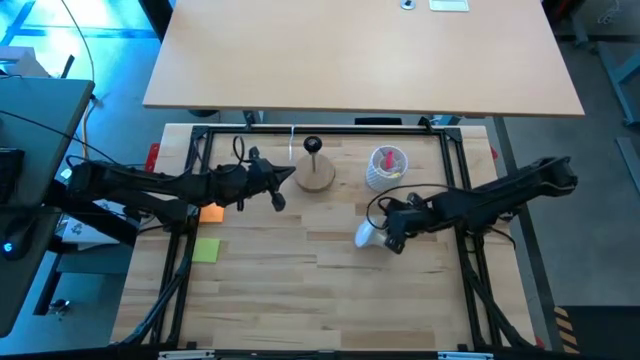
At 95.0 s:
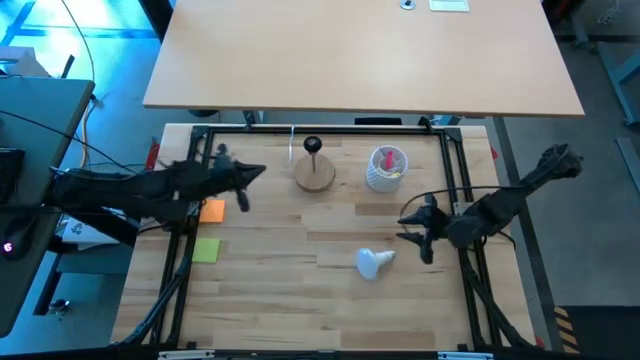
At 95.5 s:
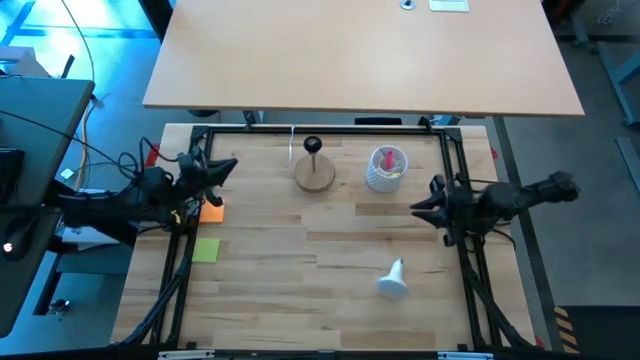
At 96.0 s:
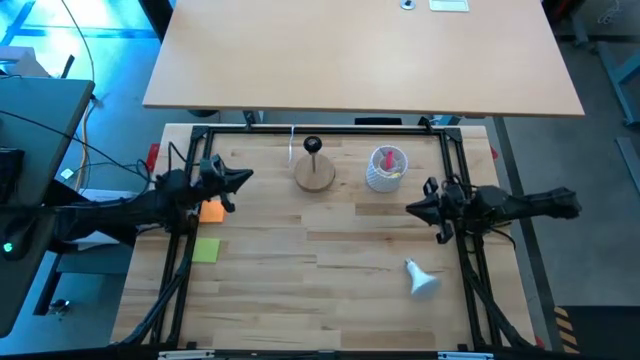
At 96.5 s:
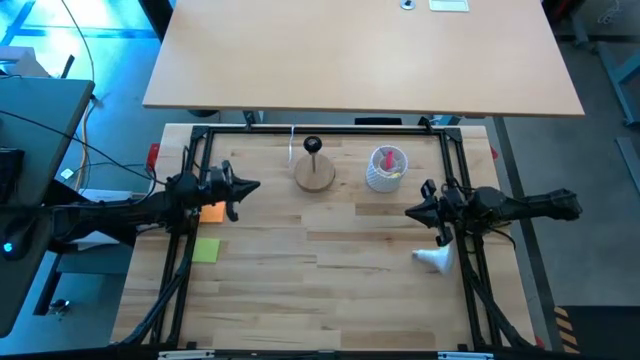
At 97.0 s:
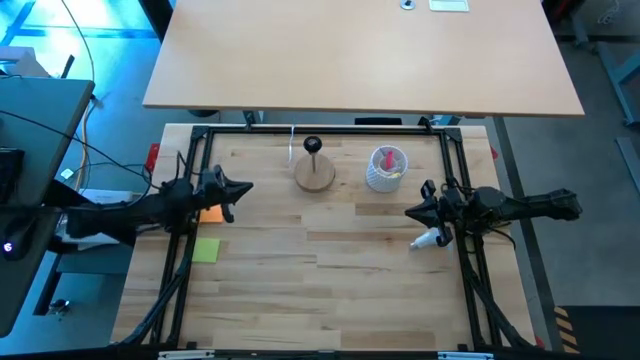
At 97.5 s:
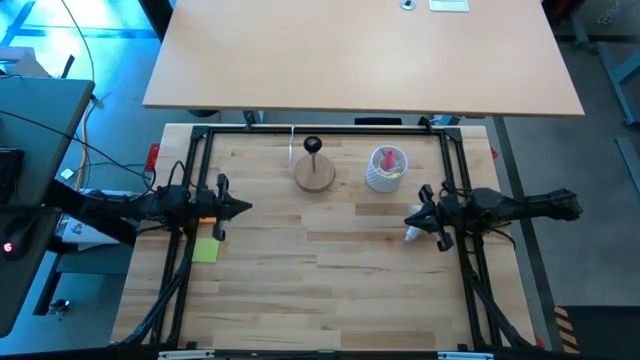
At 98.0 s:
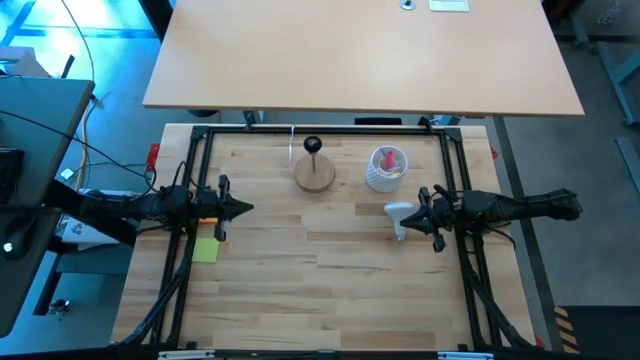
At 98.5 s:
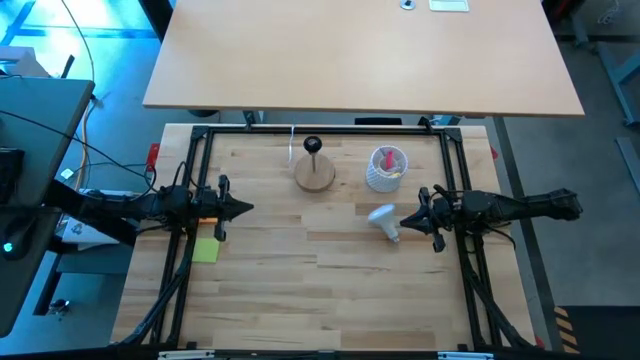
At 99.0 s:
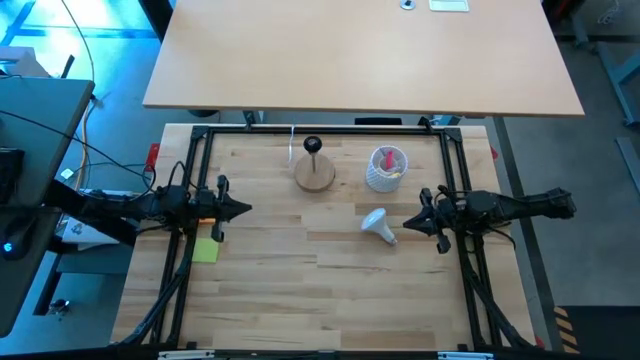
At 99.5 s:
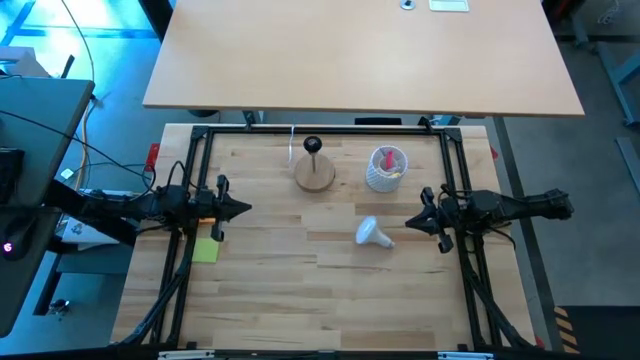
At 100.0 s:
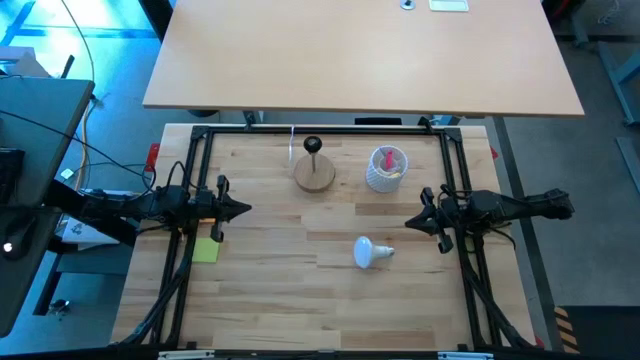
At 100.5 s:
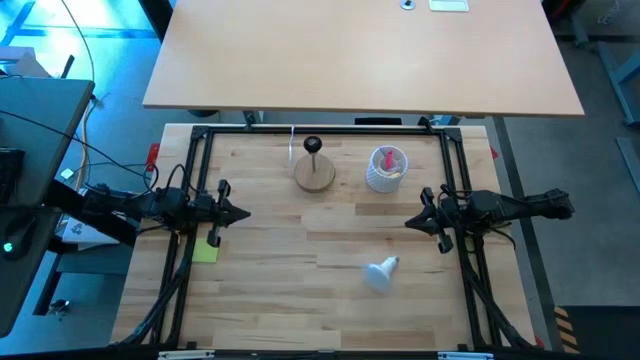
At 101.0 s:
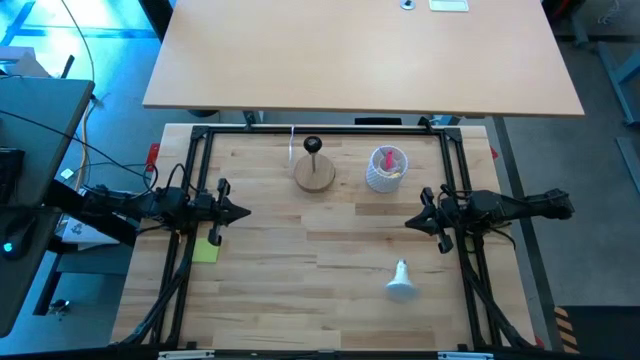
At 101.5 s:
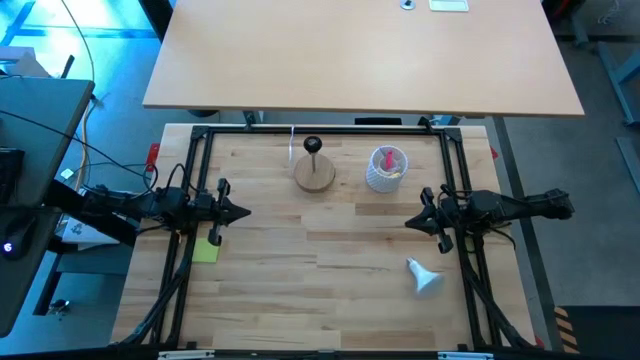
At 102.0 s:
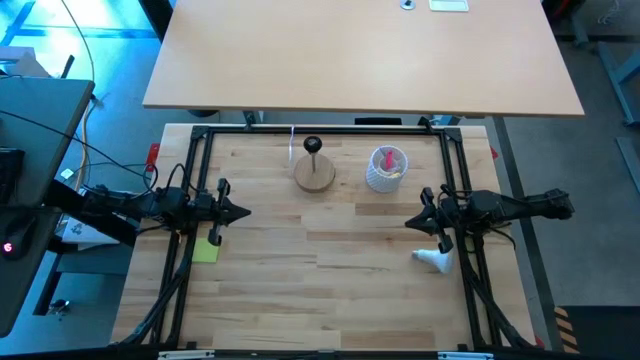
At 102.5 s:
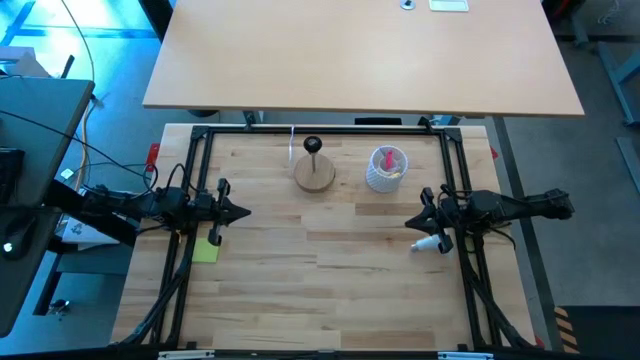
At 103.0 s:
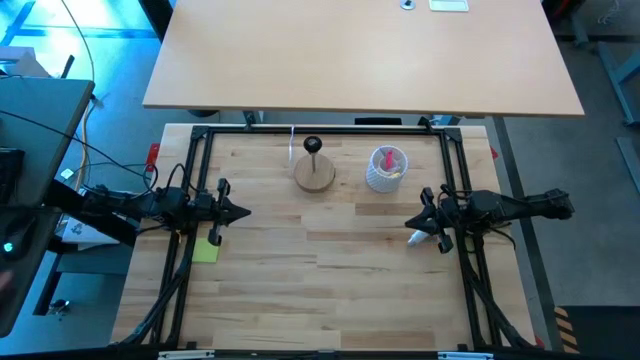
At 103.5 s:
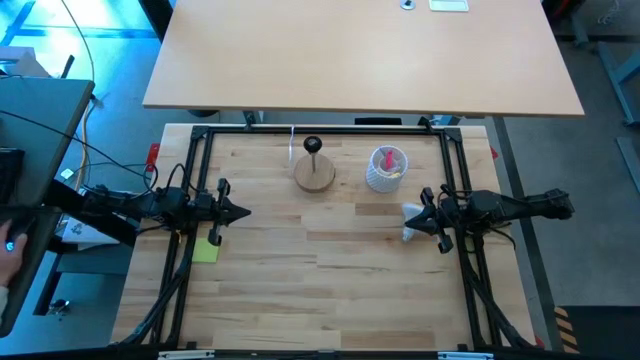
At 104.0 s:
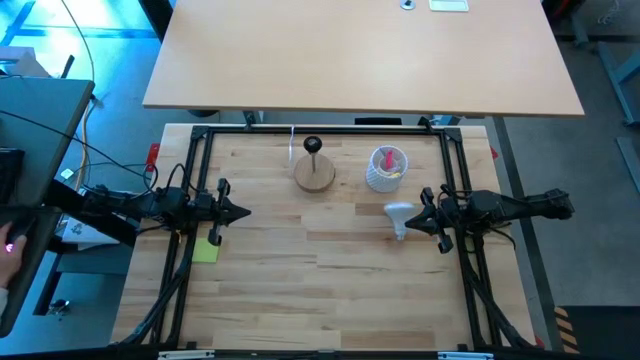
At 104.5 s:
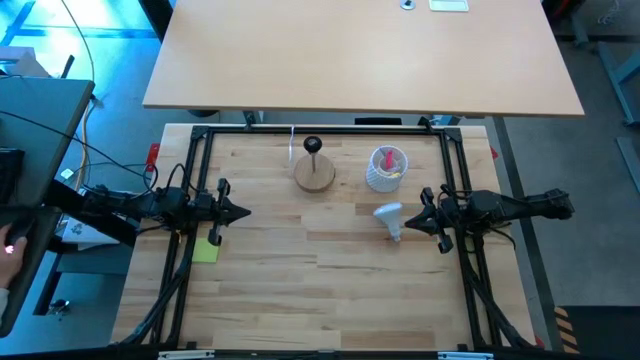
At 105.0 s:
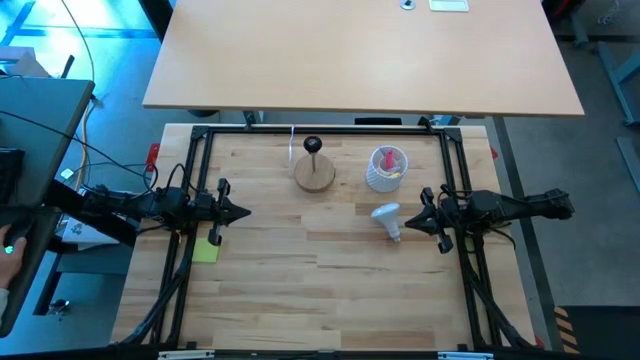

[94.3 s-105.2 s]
Task: Screw lightbulb
Return to Home Position

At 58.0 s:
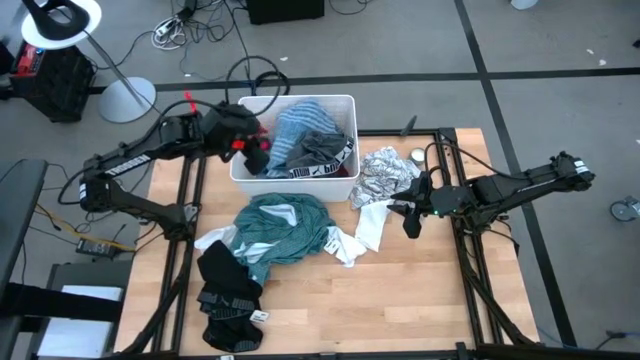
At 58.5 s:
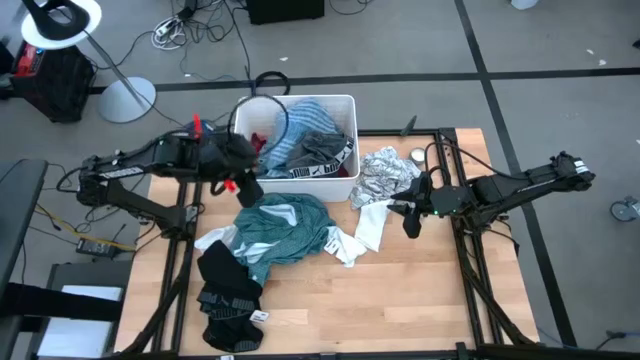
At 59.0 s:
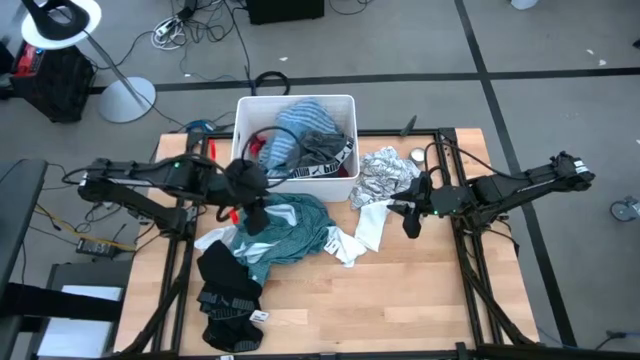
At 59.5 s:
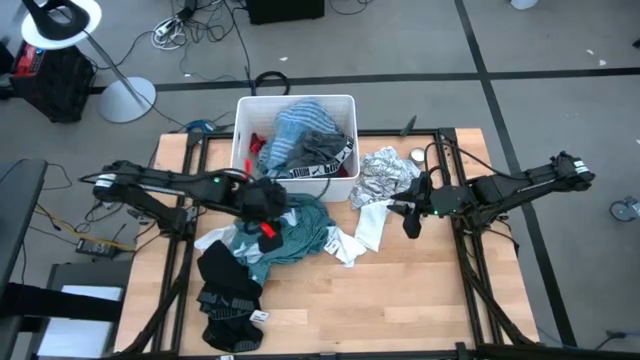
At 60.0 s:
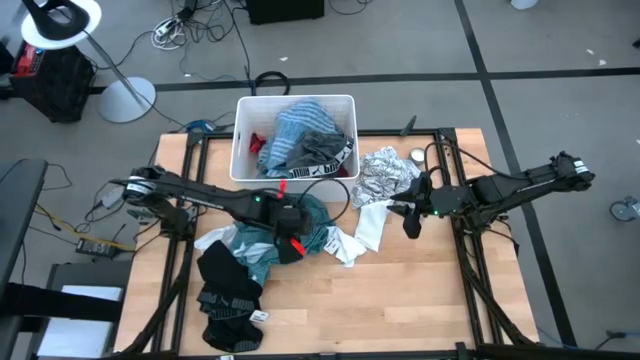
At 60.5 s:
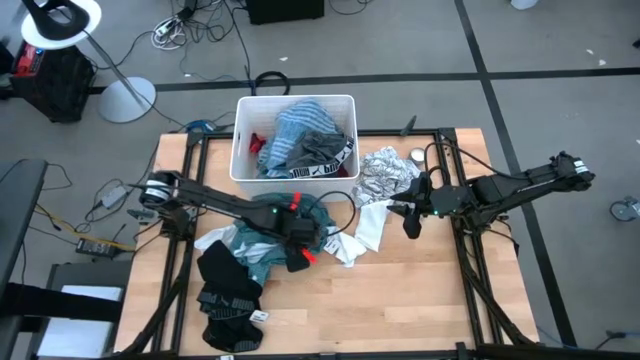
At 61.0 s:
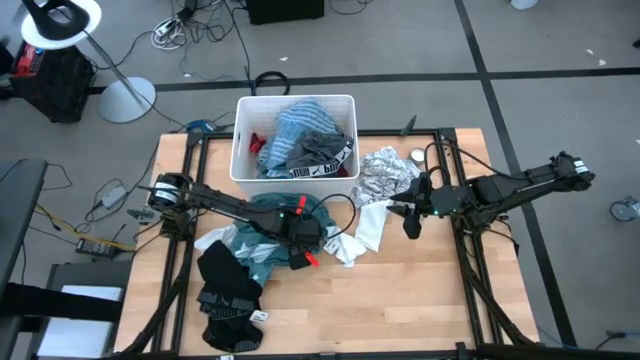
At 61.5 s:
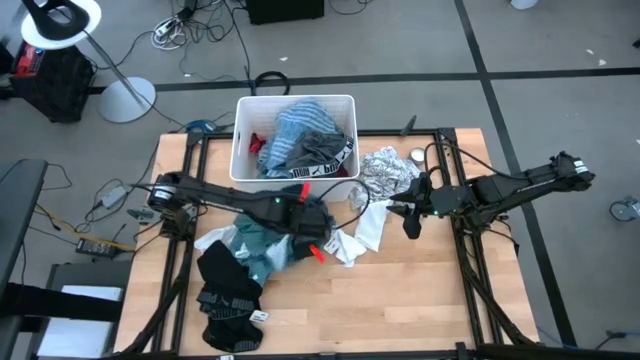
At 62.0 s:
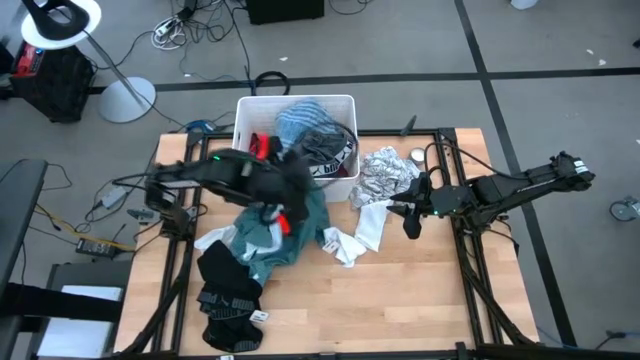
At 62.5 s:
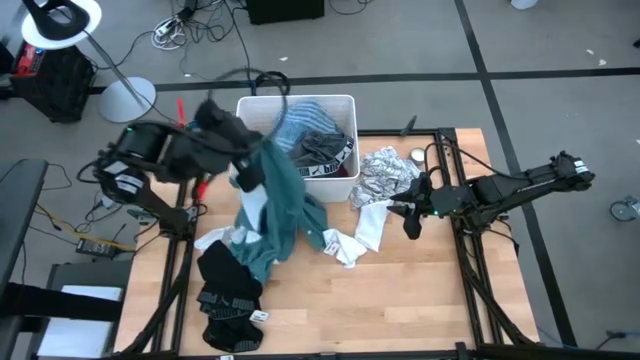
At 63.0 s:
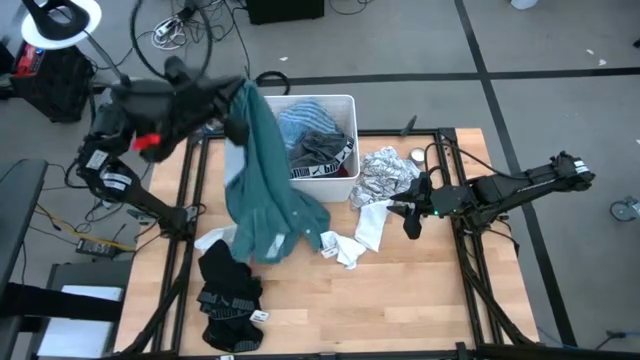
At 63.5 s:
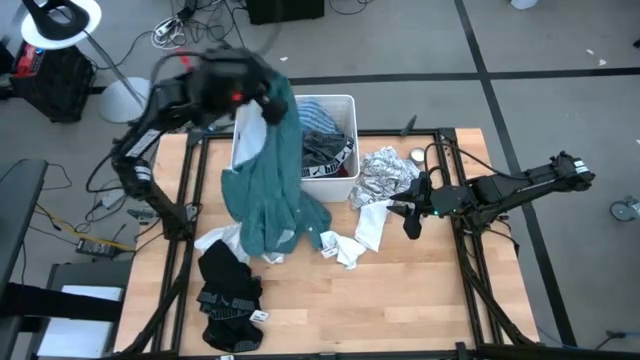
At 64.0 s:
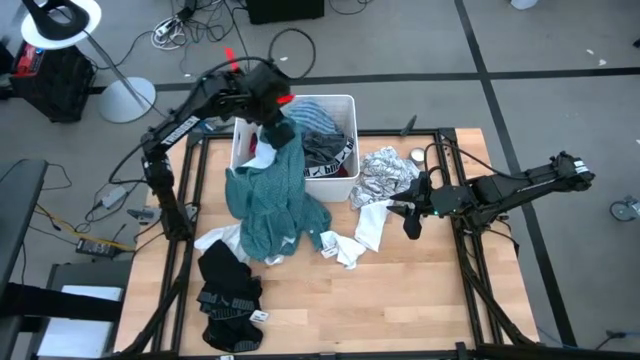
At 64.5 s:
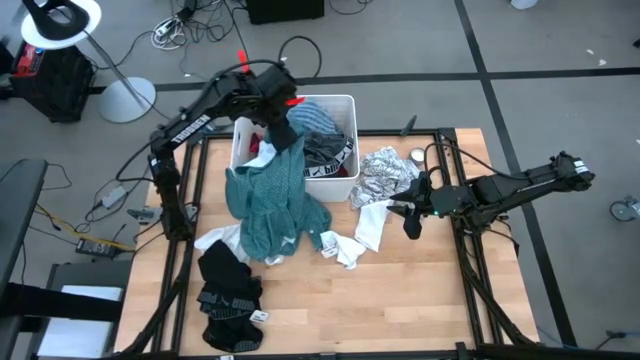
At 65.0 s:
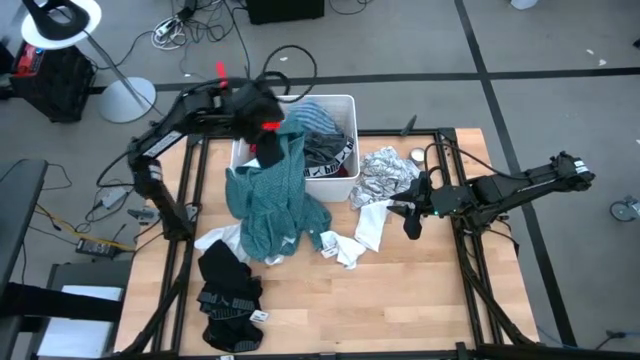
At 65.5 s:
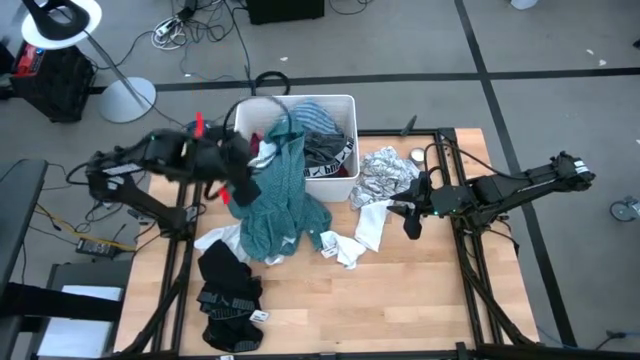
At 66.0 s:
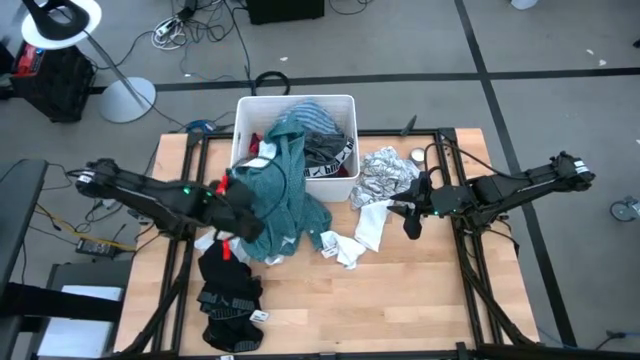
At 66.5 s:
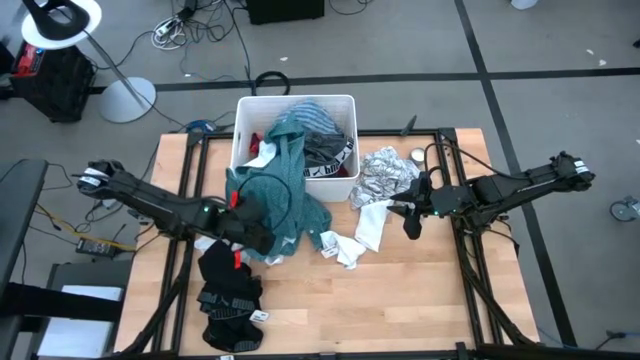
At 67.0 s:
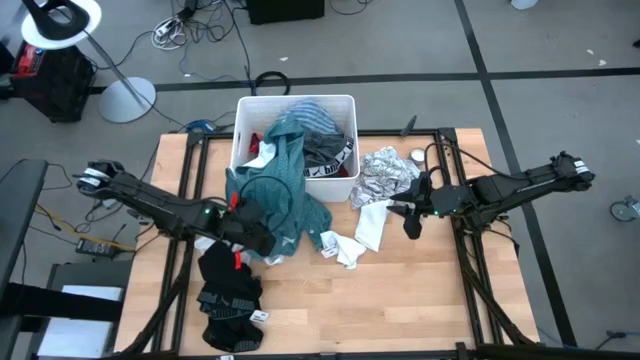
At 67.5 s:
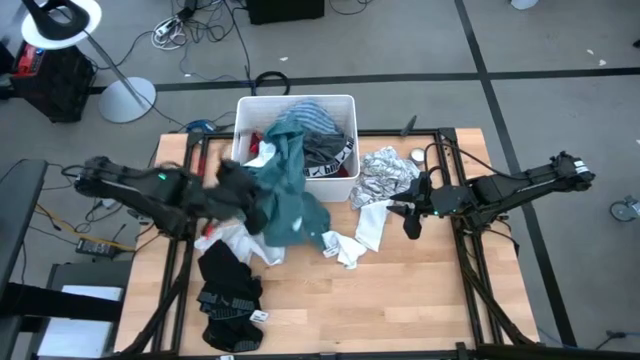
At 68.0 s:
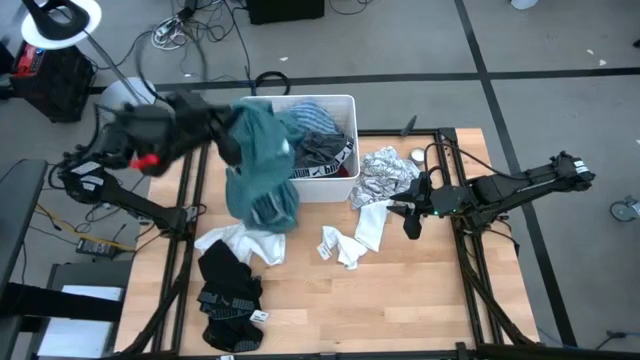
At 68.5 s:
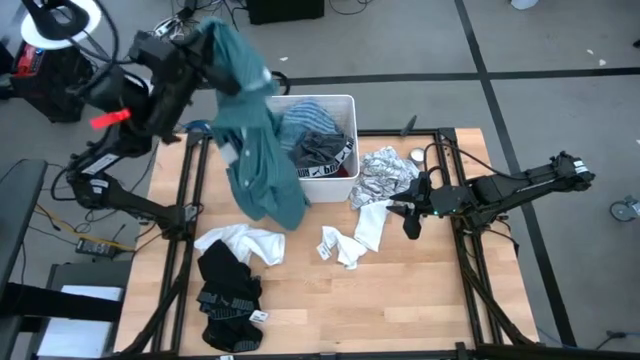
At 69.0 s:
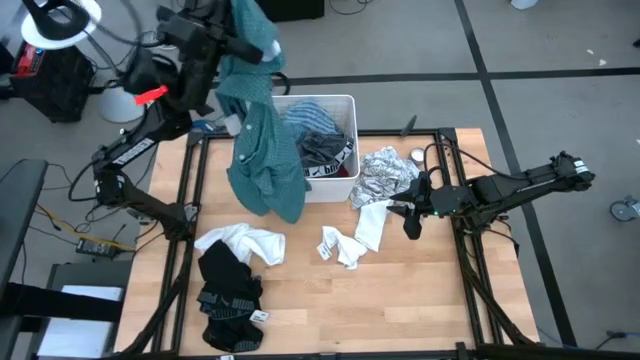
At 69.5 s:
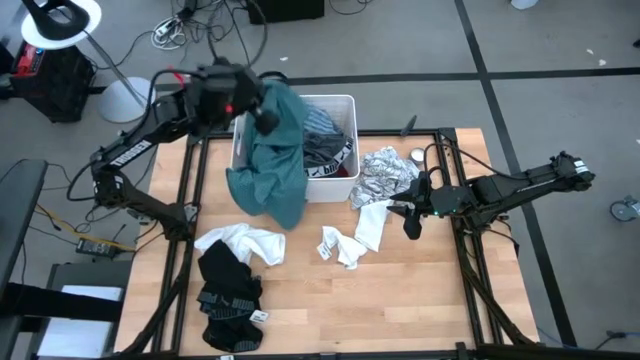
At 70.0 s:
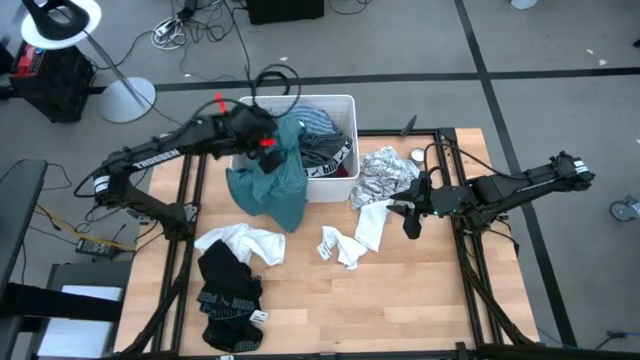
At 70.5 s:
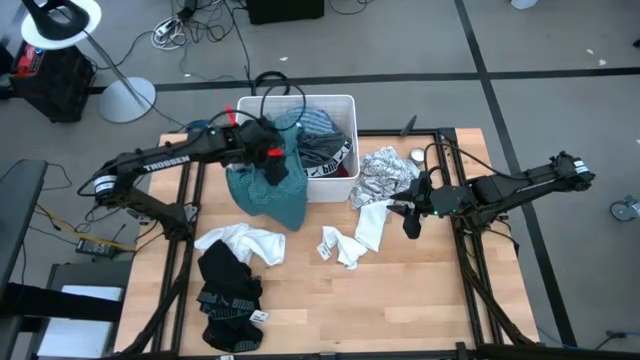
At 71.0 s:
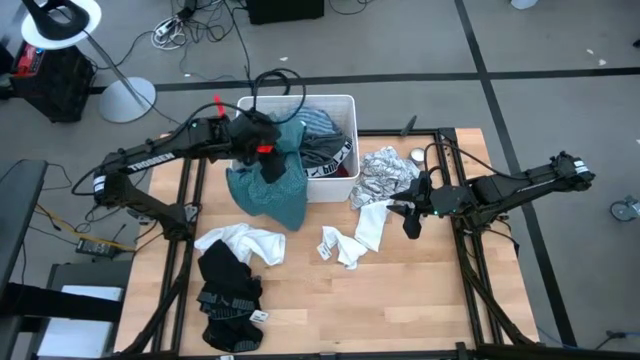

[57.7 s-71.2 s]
Task: Sort clothes
Put the green patterned long sleeve shirt into the white laundry bin
